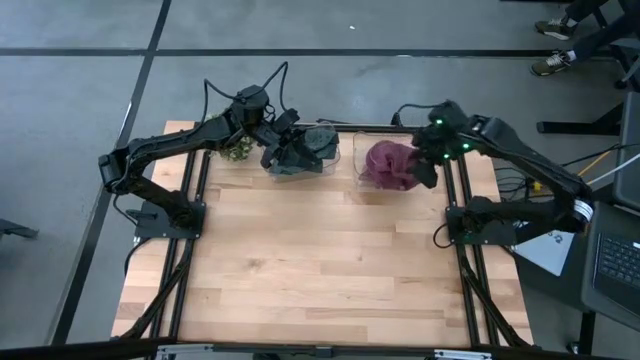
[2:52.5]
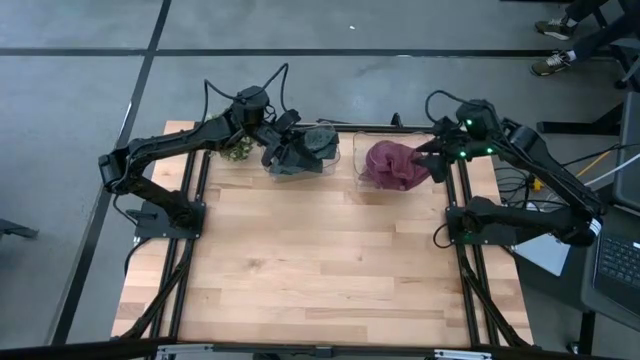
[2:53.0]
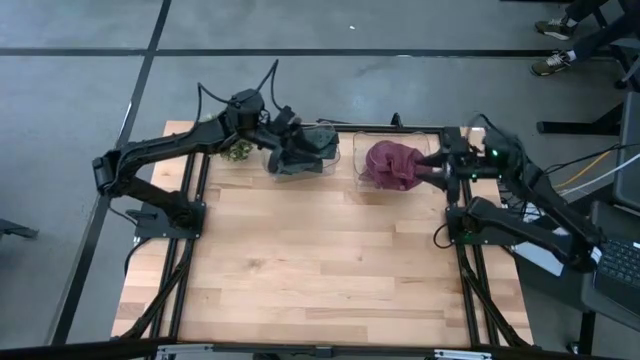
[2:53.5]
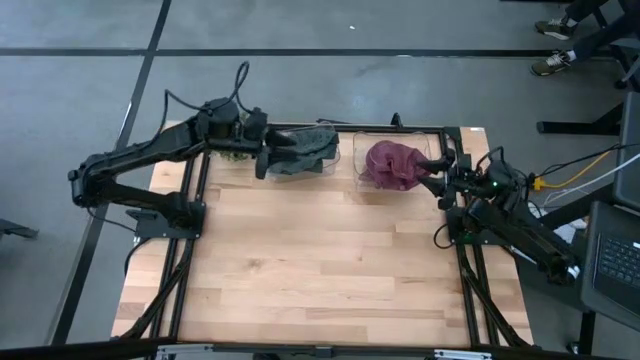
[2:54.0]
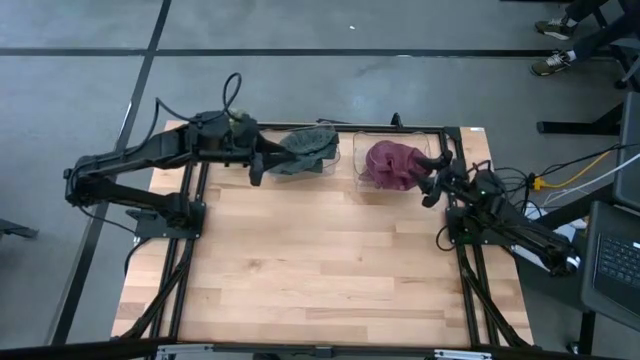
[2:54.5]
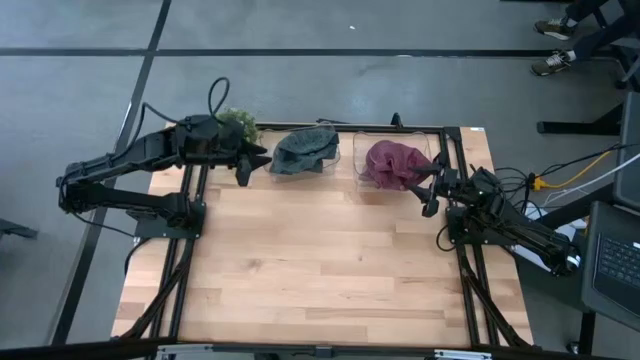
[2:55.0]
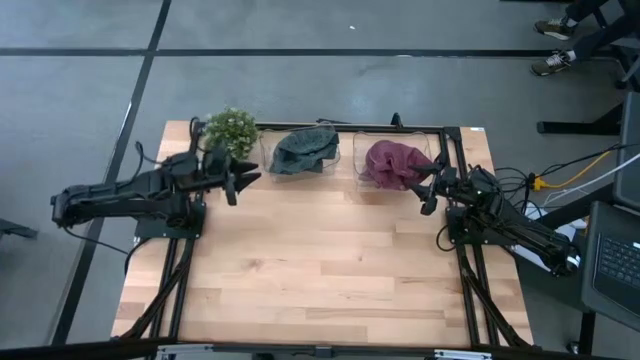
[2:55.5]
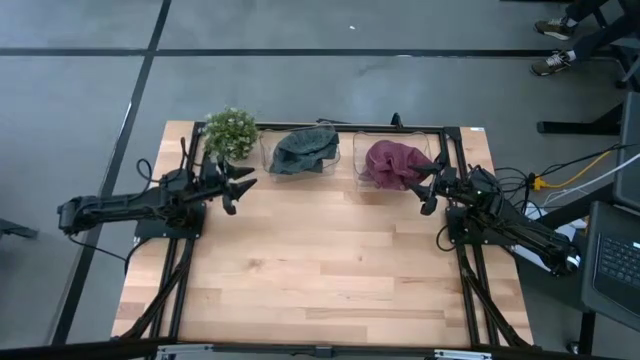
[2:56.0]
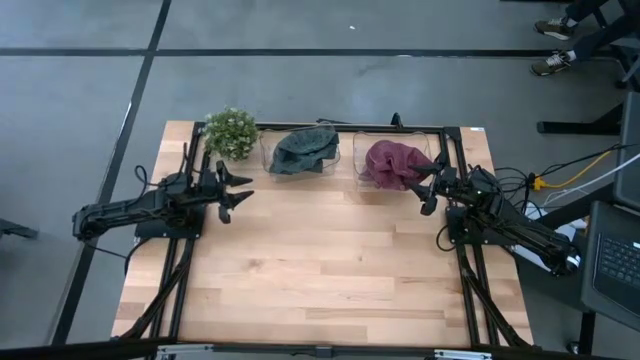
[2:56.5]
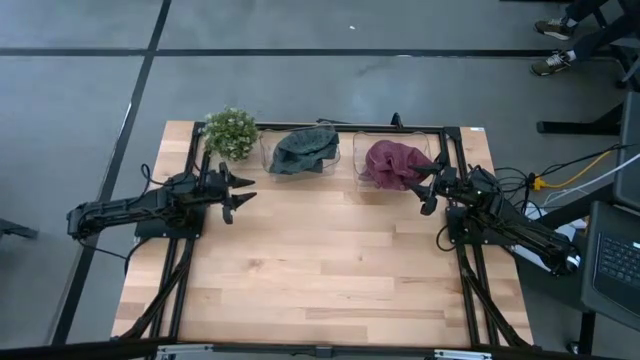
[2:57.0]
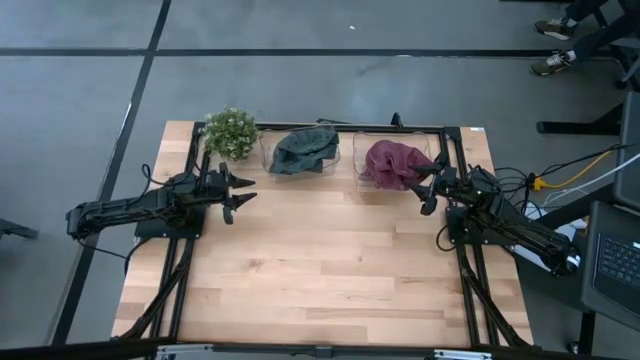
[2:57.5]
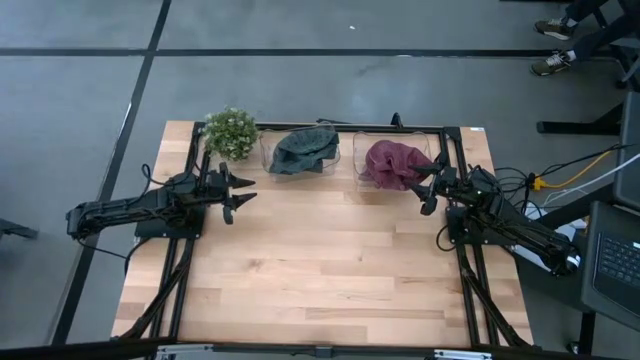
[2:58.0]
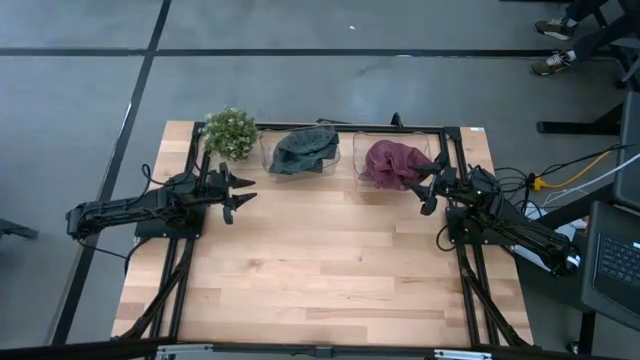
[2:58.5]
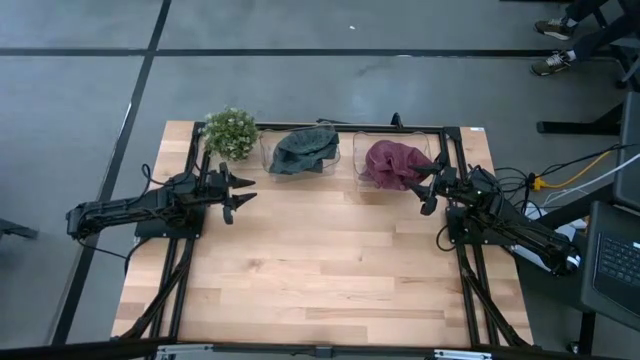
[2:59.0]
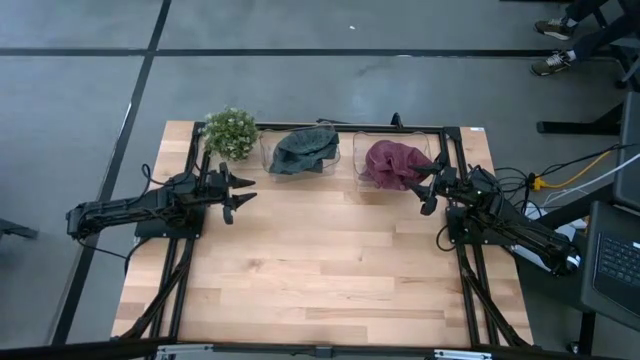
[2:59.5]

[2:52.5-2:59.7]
Task: Pick & Place hat
Return to home position

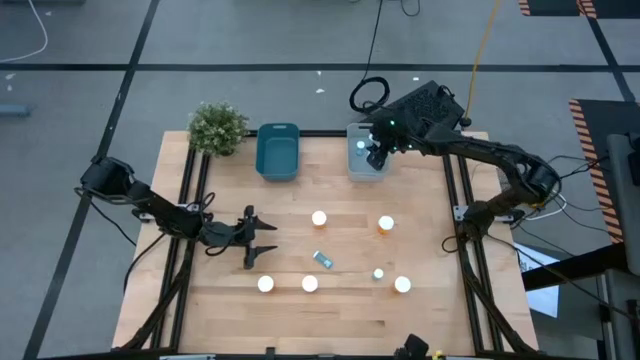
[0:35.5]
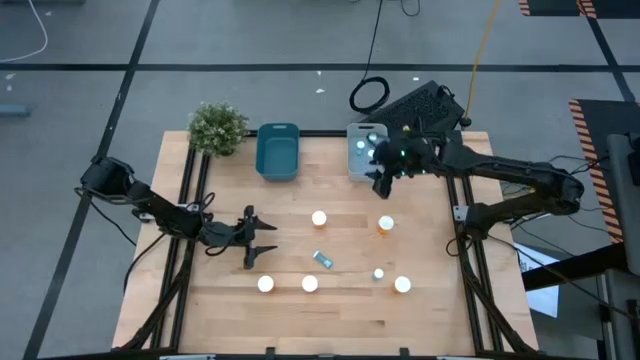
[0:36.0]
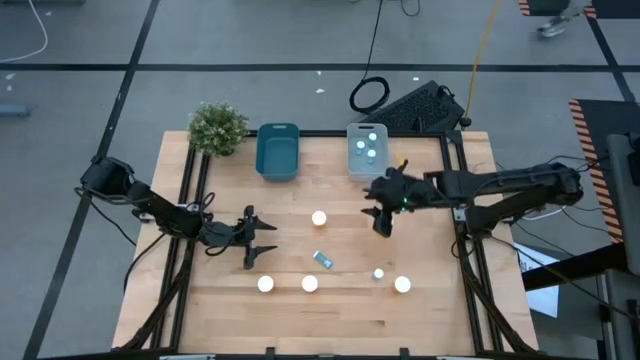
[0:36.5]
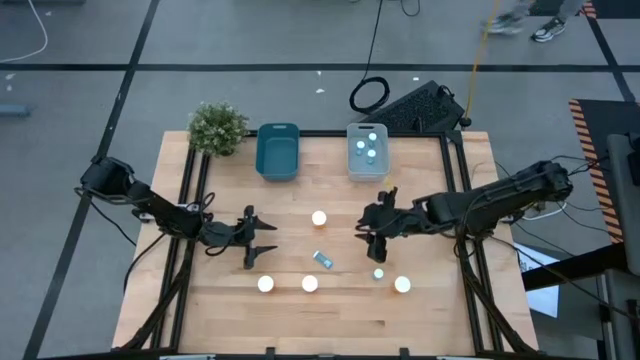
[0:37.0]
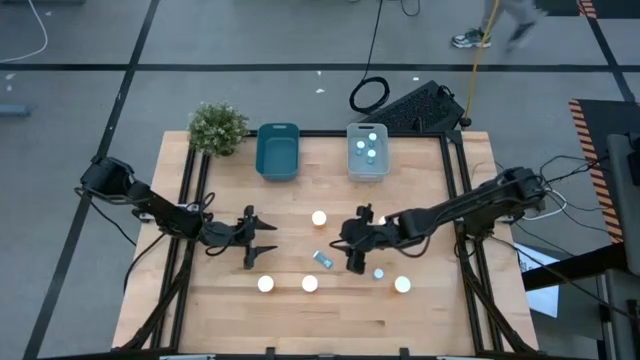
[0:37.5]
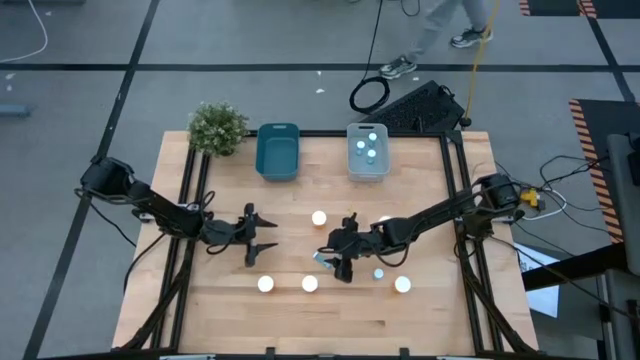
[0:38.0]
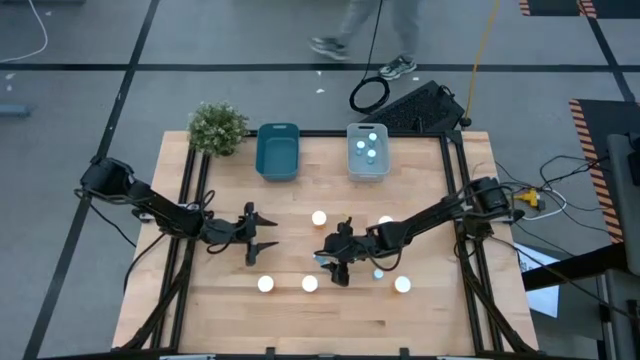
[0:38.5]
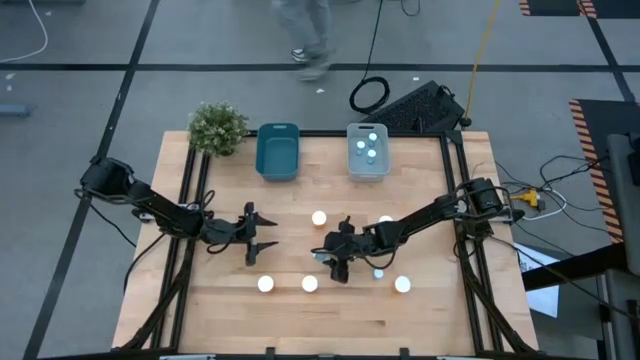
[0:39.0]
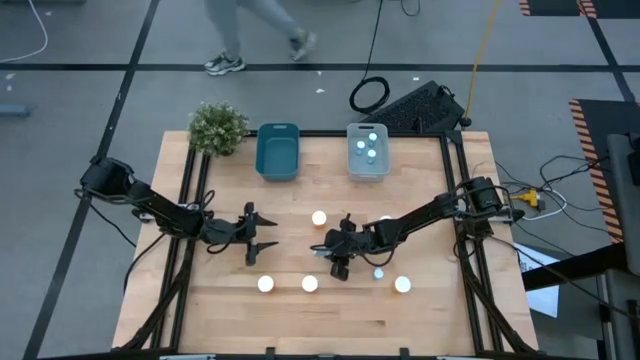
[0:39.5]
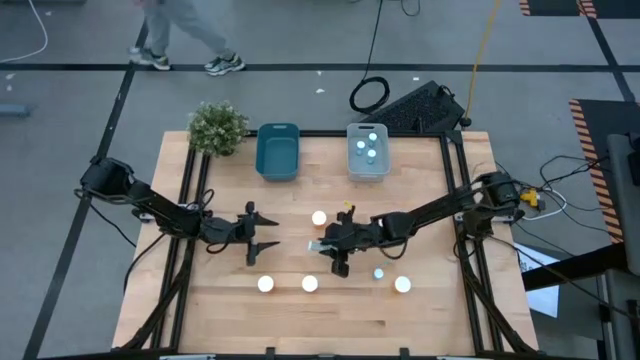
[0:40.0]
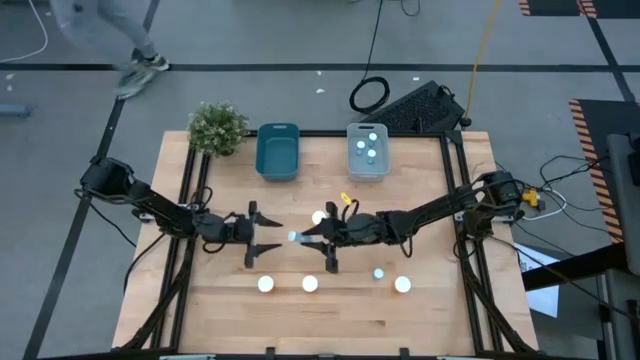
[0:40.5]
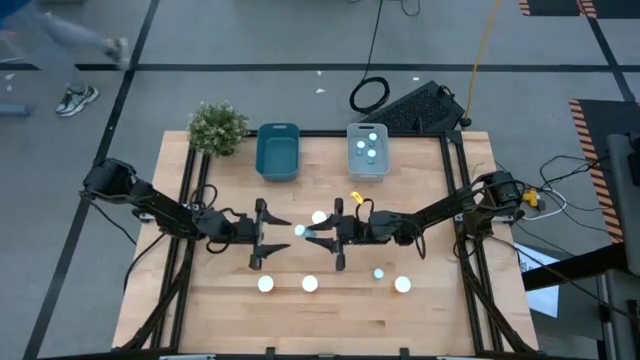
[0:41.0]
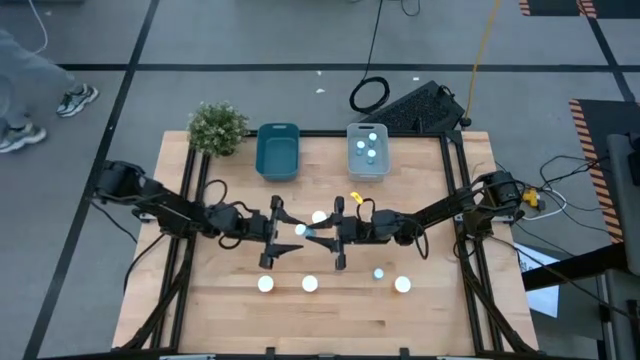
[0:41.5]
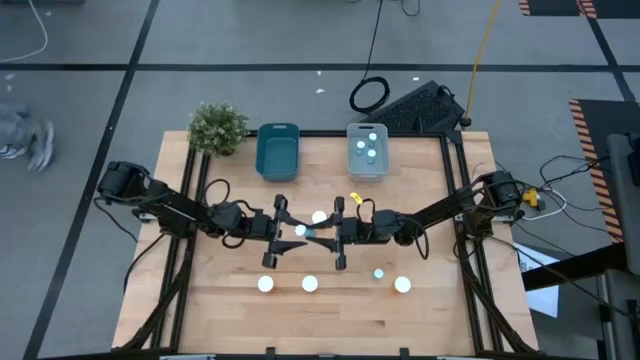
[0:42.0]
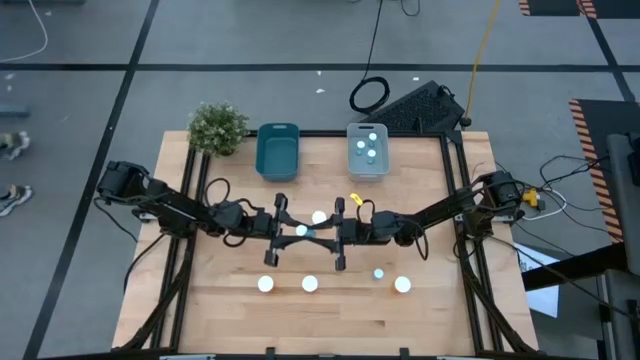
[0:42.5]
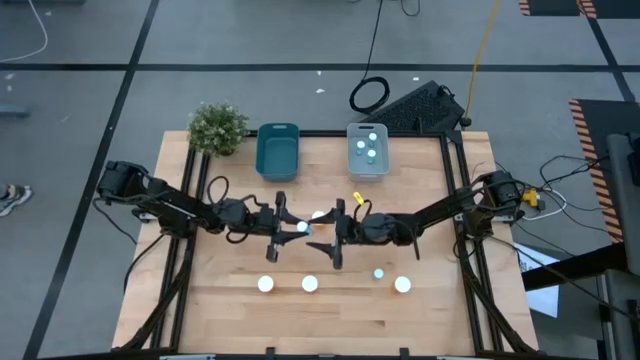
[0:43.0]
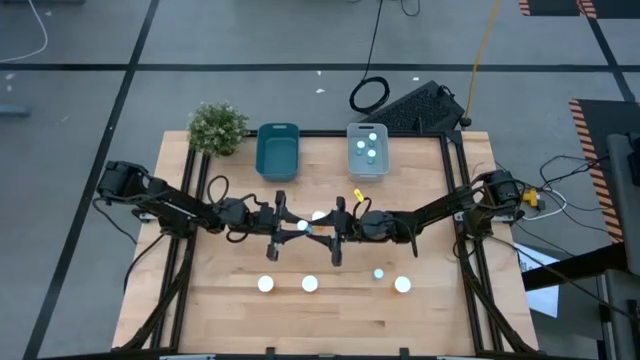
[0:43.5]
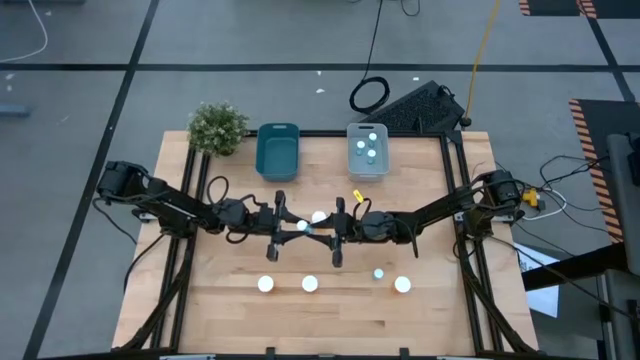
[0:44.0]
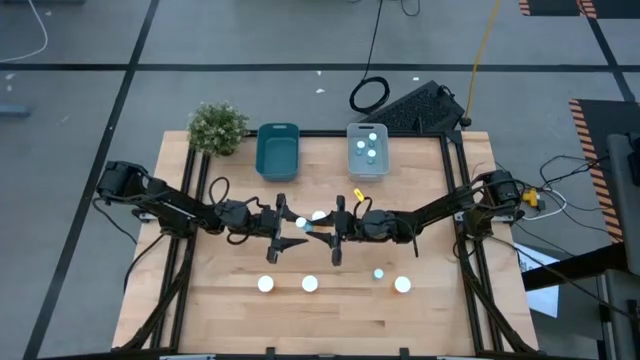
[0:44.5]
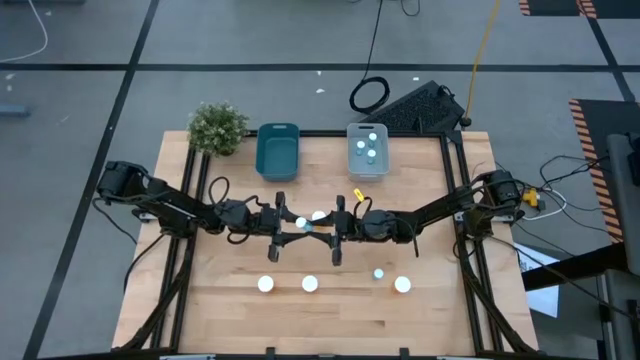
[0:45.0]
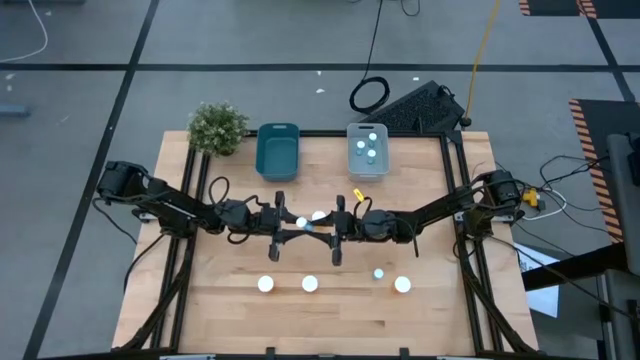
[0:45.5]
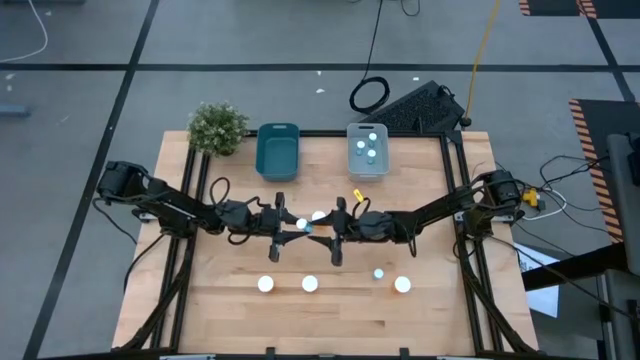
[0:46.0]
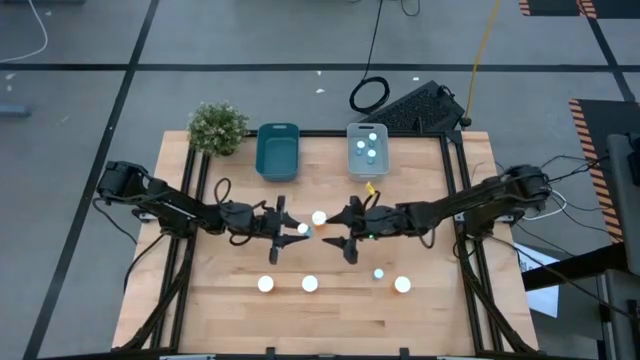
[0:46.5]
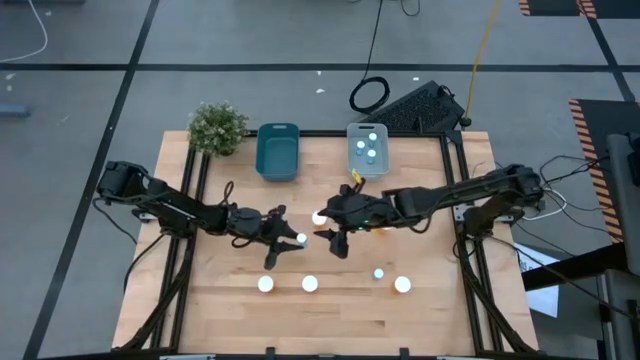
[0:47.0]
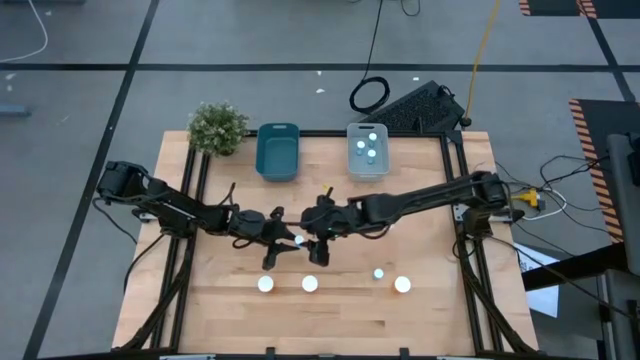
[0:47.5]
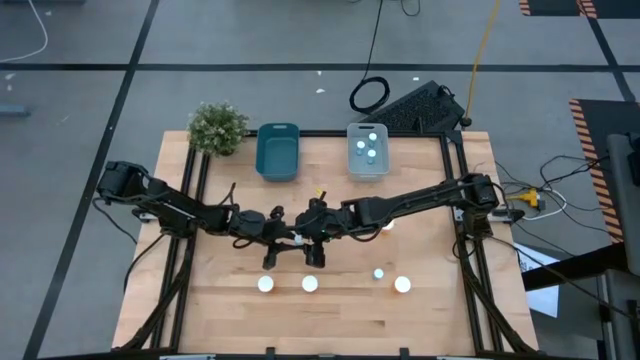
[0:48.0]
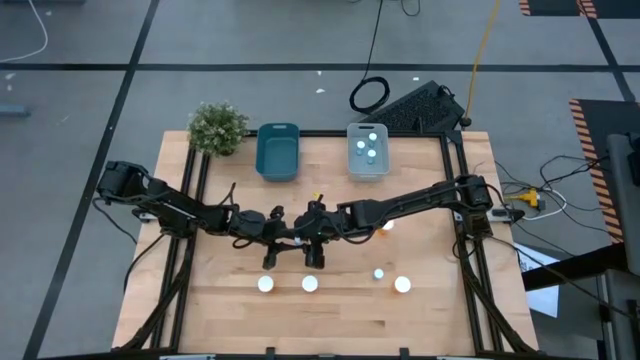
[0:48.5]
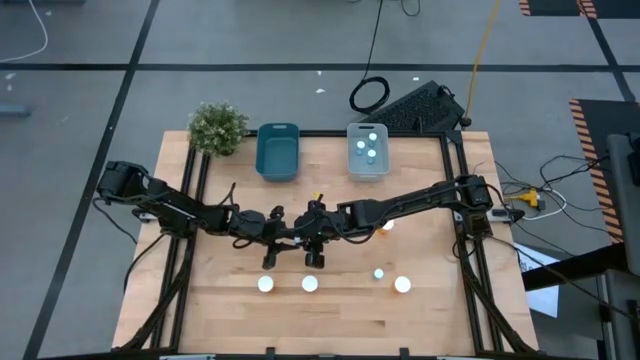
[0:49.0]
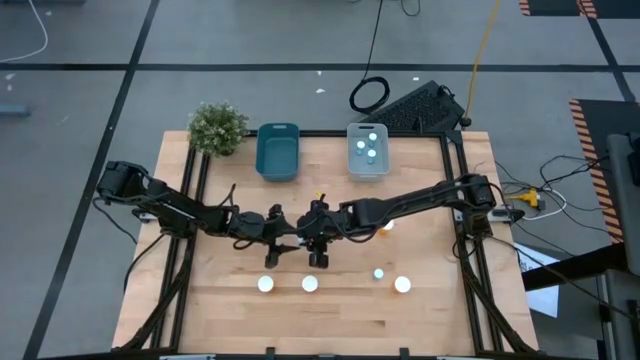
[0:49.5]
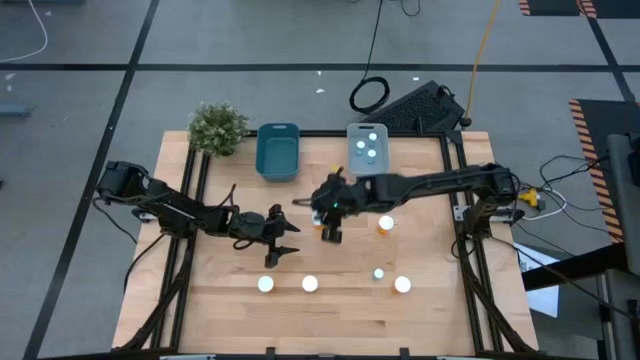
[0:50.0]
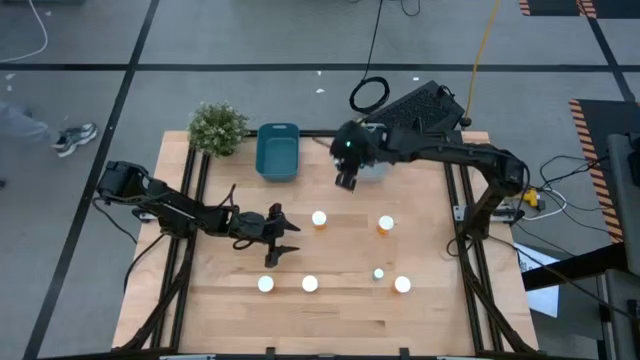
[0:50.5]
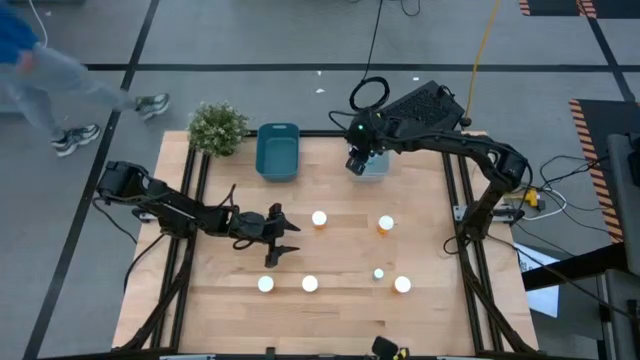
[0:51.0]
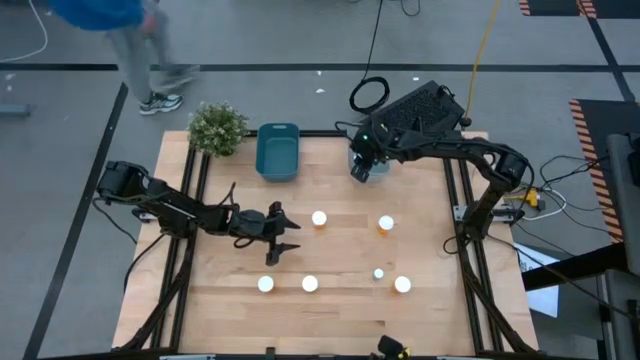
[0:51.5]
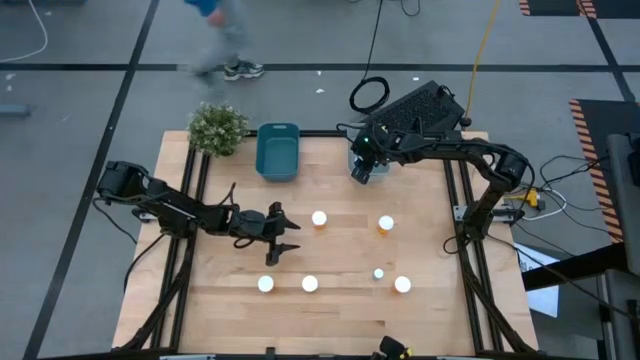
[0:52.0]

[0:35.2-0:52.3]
Task: Pick and place medicine bottles into bin by pill shape (circle, oval)
Put the blue pill bottle into the gray bin
